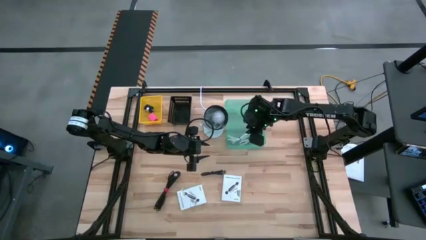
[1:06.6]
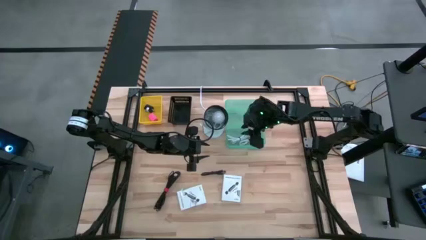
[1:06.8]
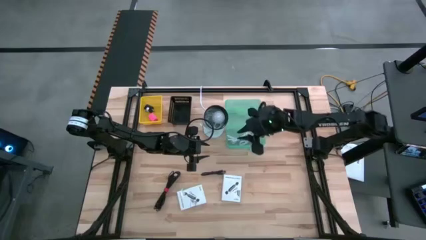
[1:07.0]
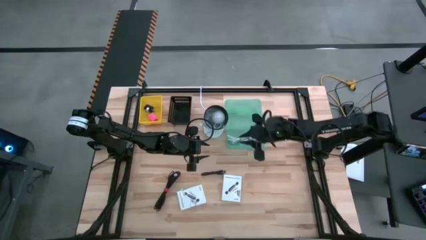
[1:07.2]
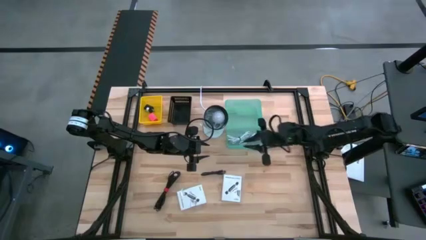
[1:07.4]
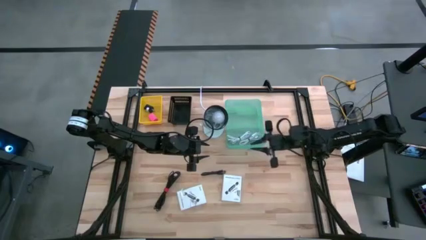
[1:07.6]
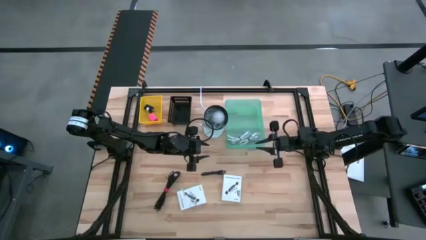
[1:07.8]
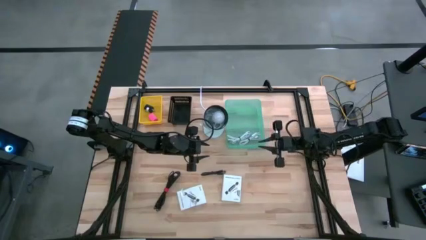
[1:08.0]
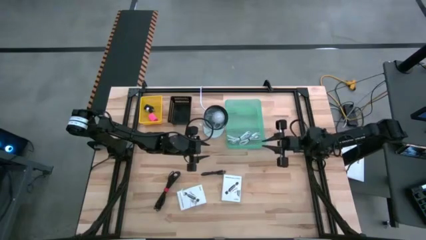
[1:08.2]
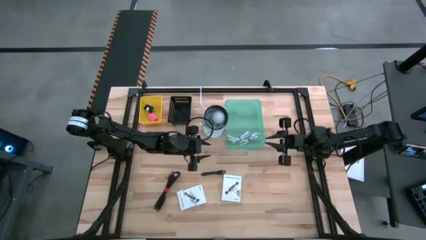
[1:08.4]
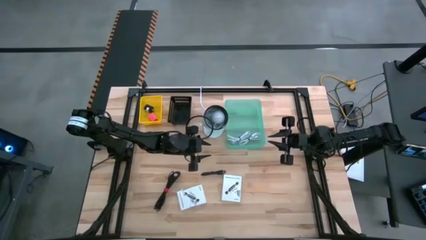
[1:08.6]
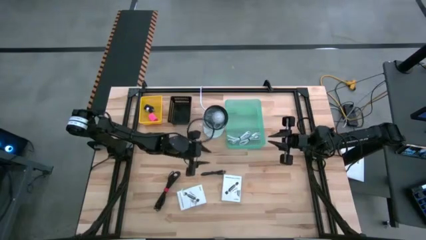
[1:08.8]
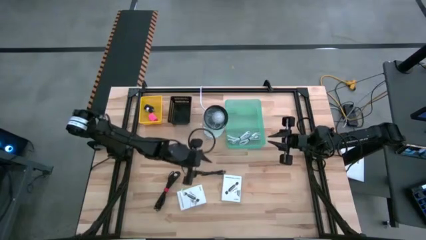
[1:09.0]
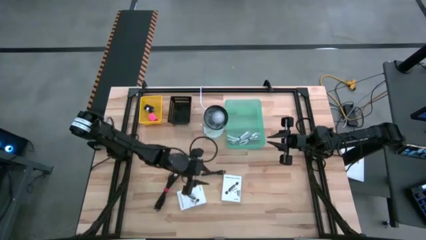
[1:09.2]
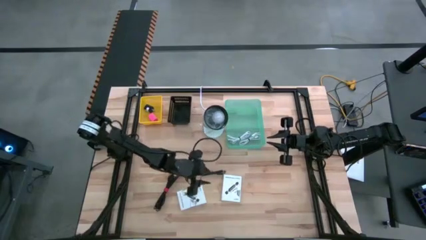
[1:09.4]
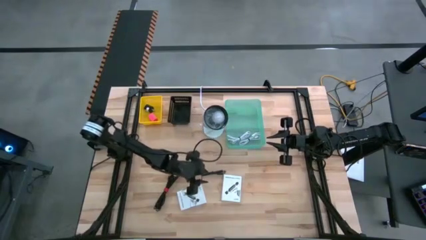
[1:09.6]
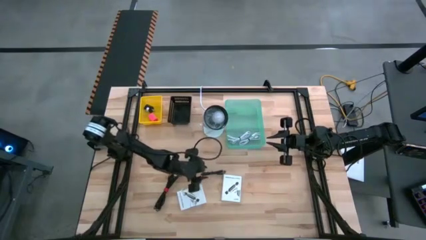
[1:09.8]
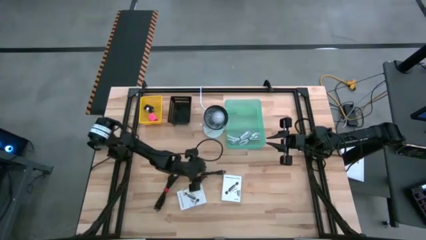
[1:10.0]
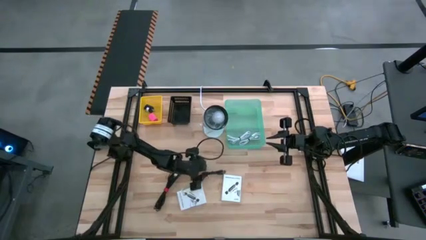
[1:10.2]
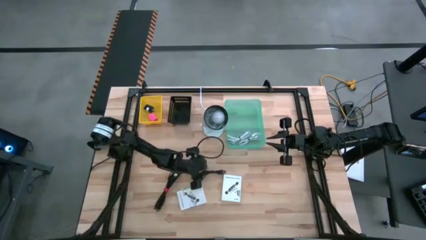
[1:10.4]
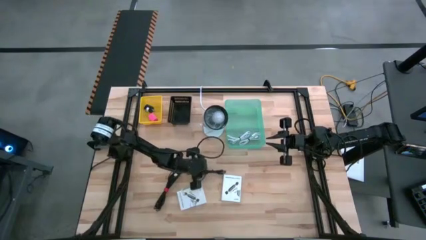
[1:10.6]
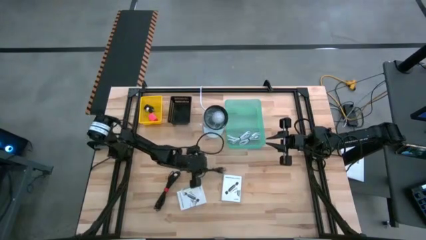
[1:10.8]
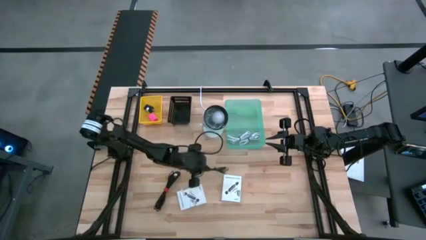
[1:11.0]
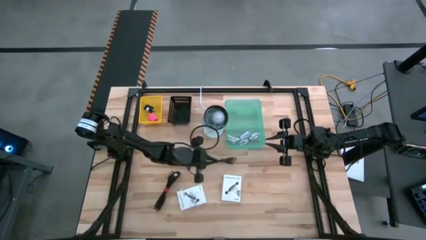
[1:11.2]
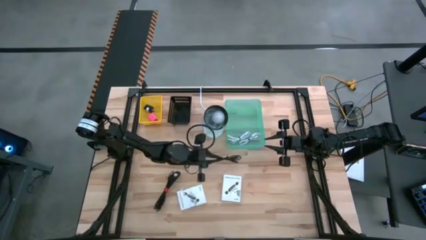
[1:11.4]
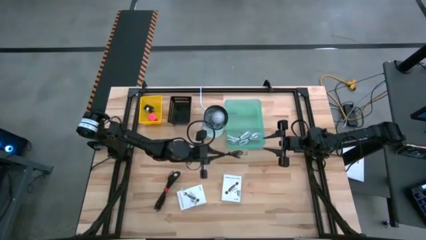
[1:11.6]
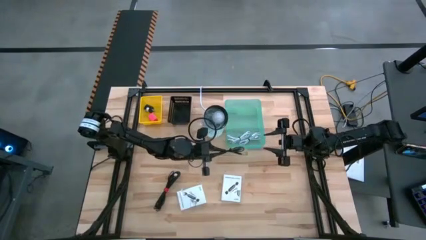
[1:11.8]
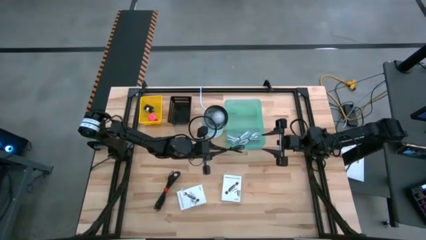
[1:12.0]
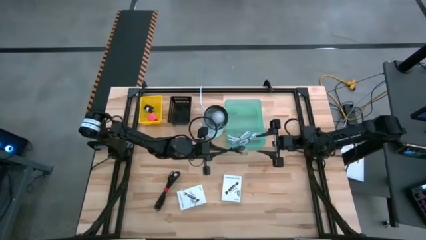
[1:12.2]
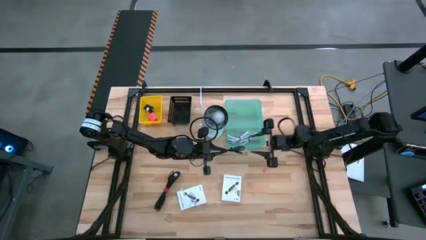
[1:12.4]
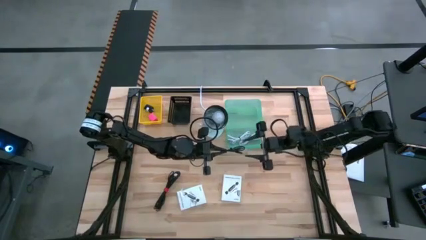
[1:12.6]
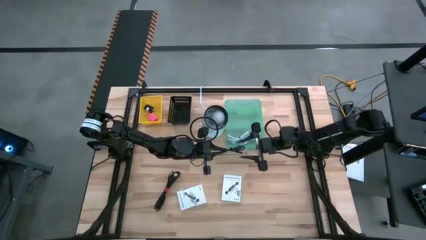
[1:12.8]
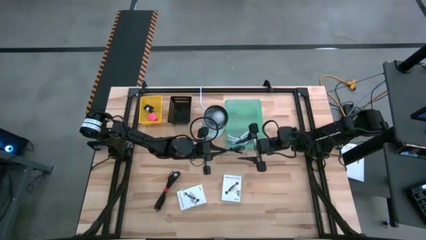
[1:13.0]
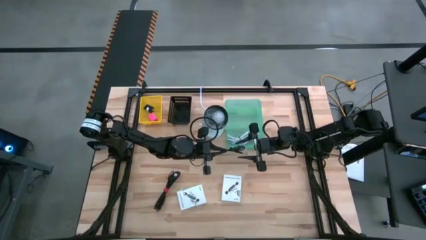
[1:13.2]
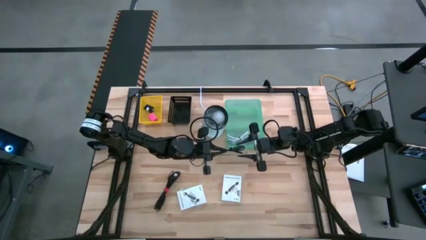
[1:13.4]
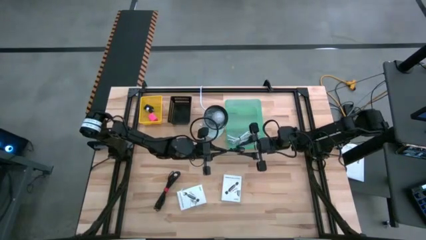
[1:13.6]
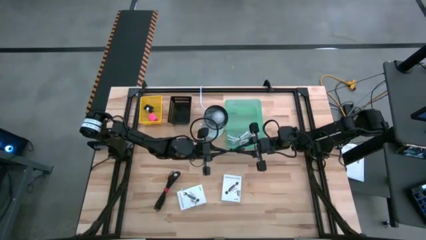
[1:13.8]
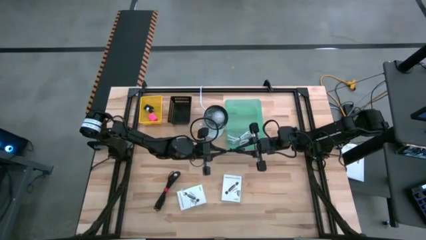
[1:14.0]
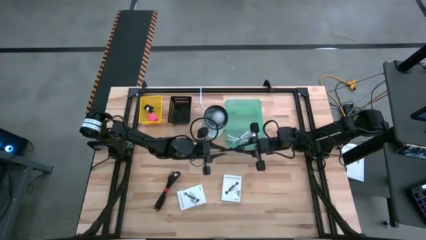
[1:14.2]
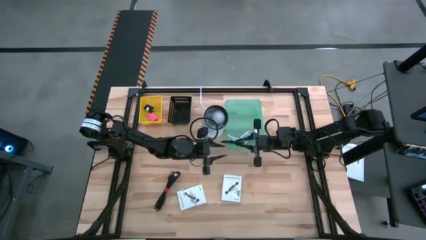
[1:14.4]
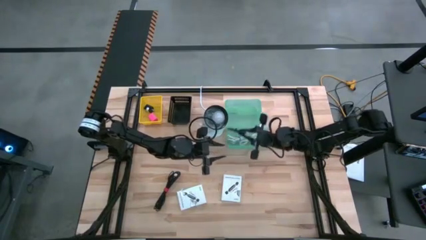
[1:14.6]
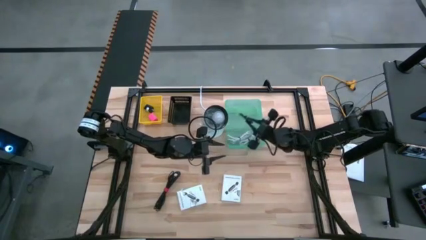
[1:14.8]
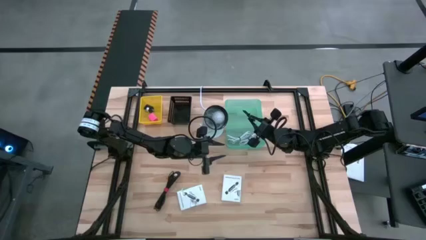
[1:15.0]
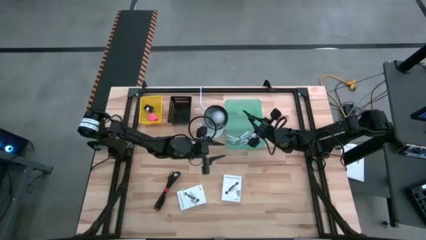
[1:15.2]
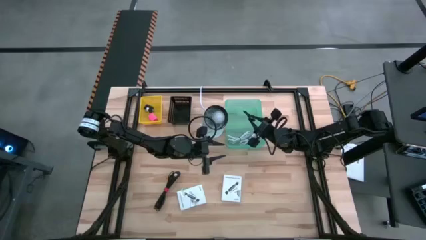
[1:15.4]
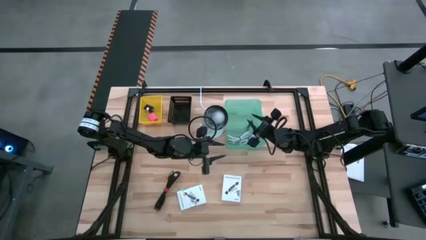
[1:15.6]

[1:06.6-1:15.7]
Task: Pick and place items into bin
Put the right black charger into the green bin

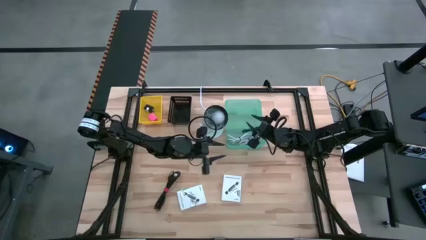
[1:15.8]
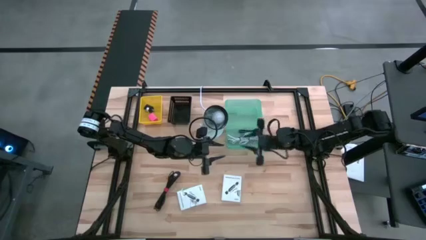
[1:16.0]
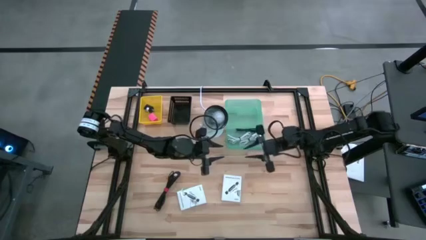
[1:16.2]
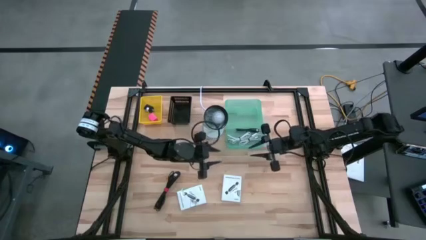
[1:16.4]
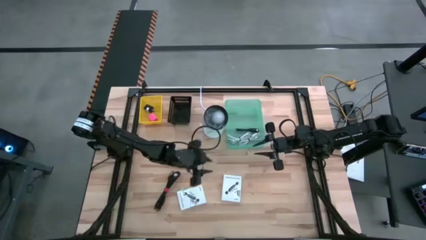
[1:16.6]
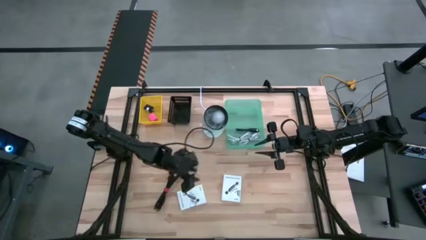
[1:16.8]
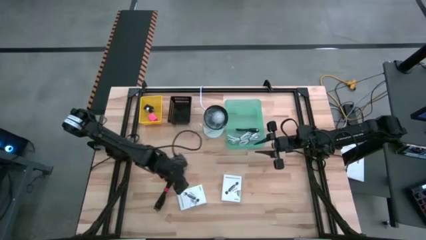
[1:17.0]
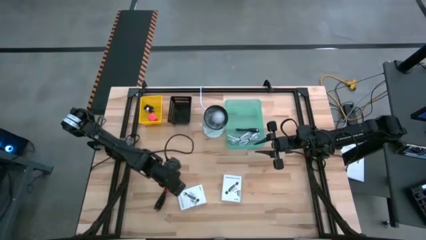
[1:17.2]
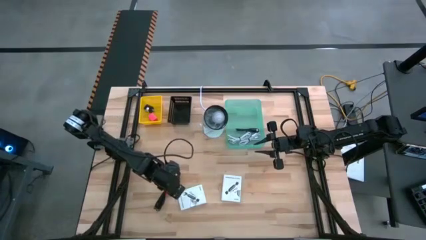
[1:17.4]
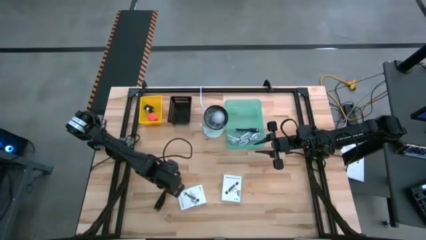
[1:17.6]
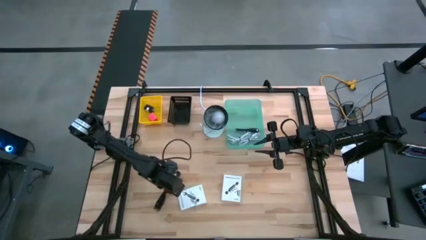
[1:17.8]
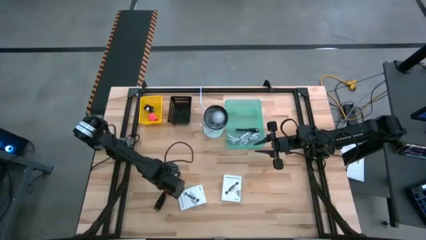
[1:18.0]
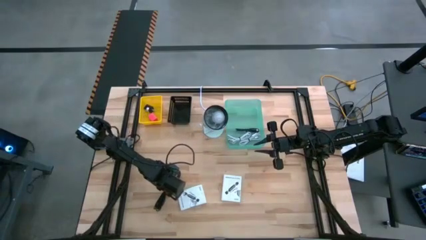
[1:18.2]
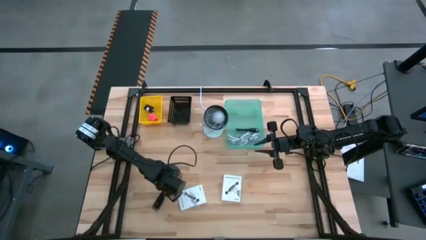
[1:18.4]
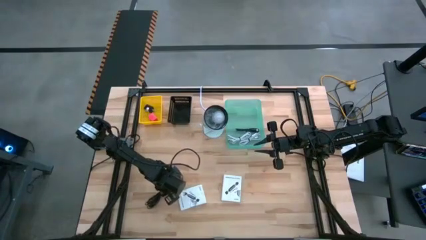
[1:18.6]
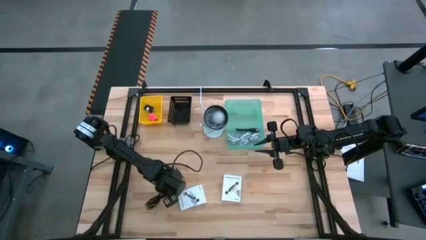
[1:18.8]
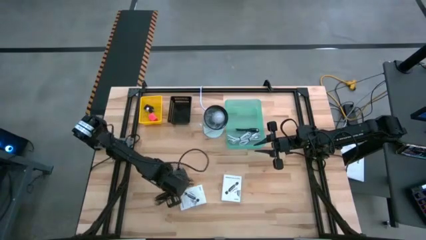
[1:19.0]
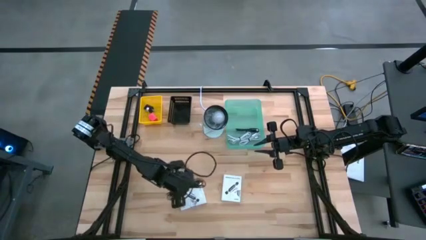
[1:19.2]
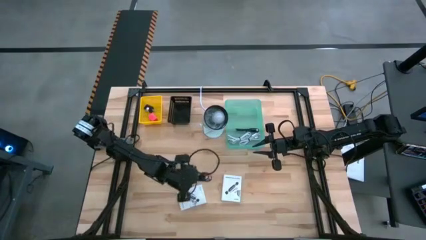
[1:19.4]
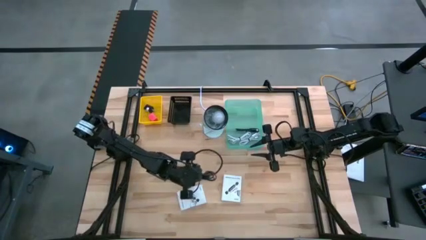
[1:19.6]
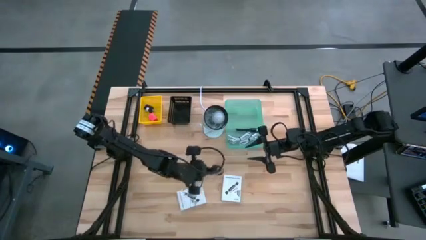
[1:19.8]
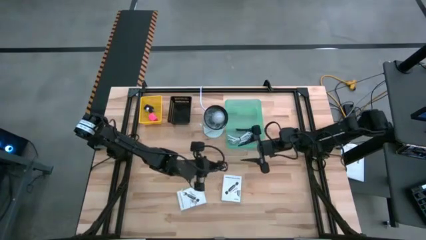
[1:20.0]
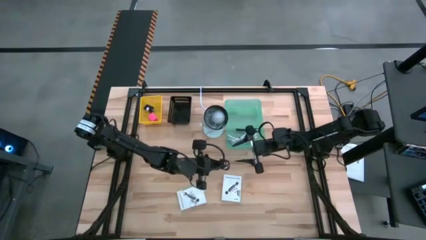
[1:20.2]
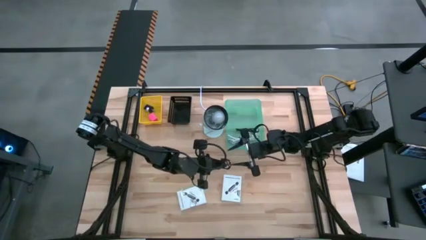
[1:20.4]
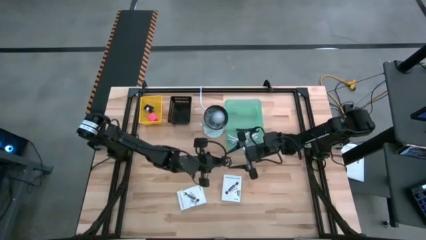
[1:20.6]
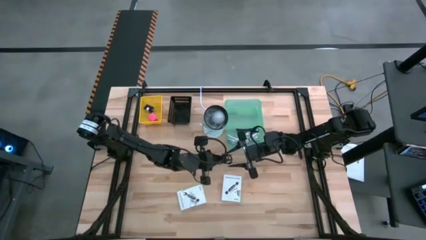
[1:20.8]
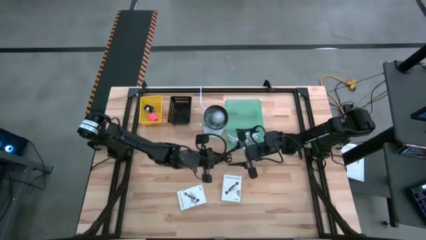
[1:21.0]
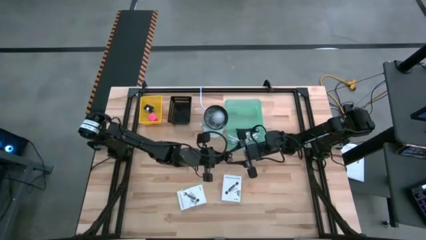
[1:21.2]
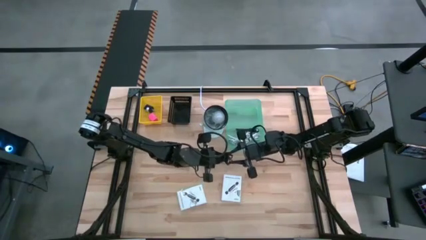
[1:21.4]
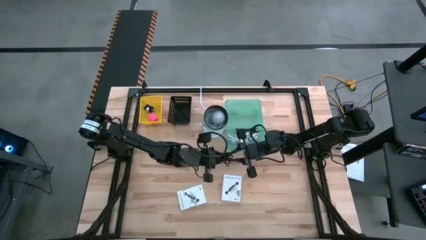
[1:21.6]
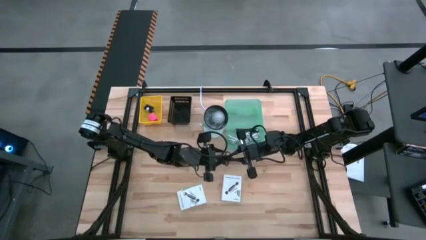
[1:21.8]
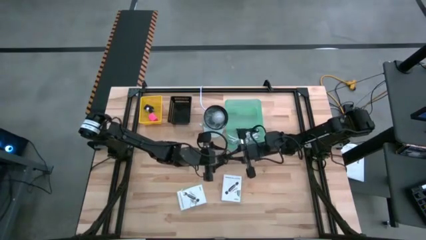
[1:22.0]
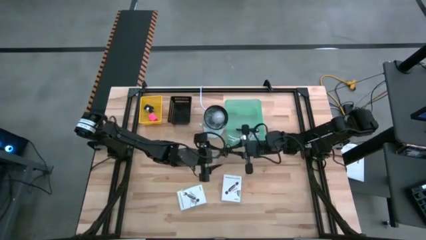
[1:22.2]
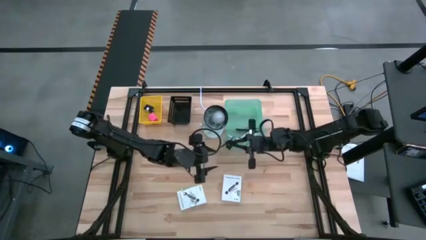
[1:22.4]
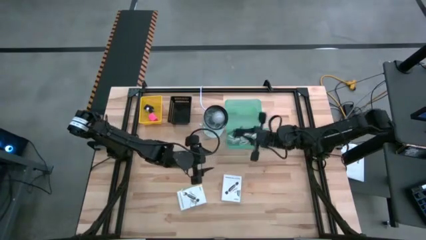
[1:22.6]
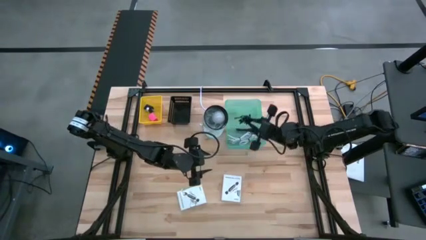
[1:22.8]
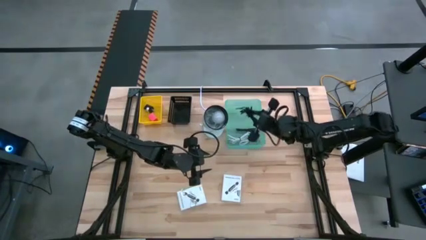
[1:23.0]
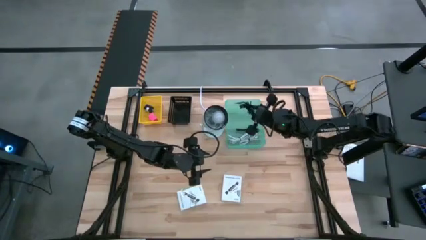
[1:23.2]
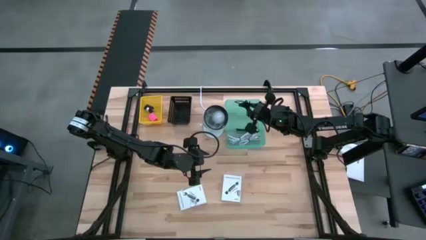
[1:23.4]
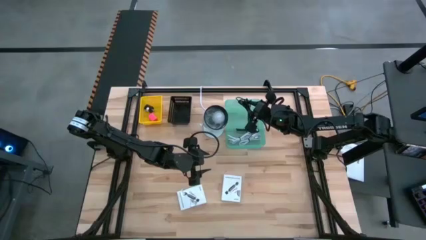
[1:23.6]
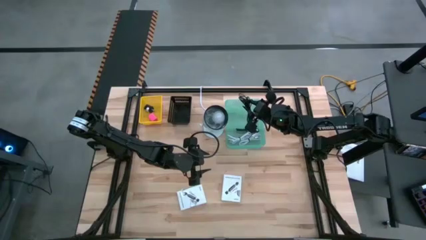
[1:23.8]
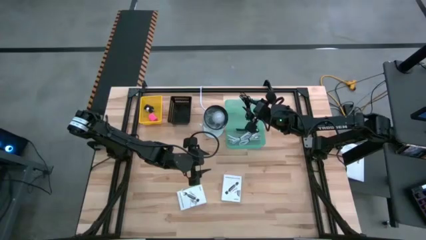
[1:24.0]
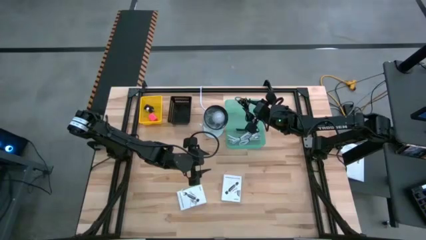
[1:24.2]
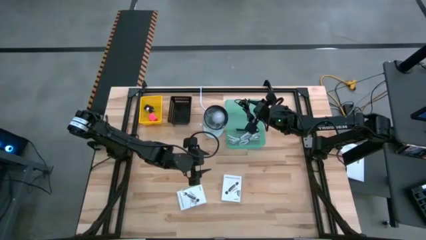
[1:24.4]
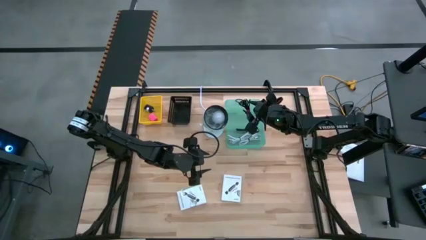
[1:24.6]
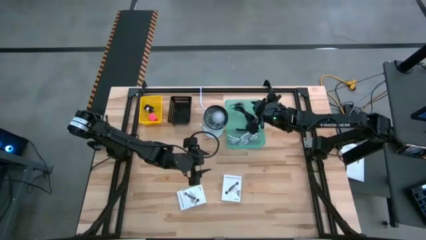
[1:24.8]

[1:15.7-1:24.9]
Put the black charger into the green bin
